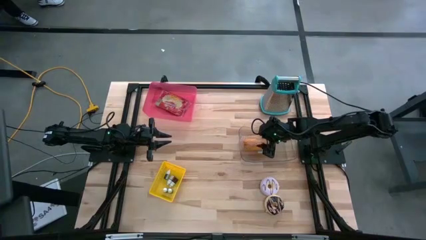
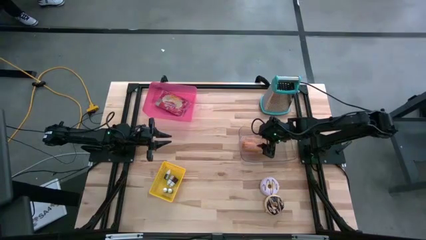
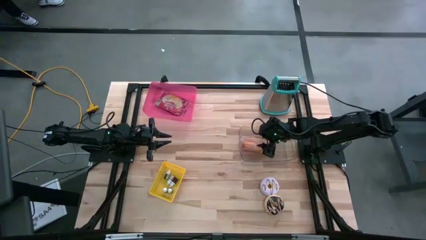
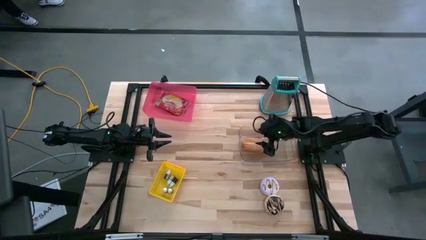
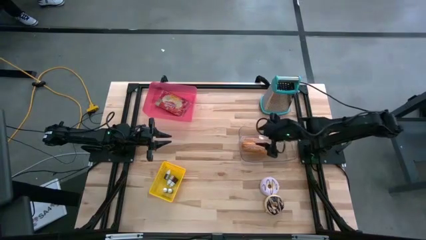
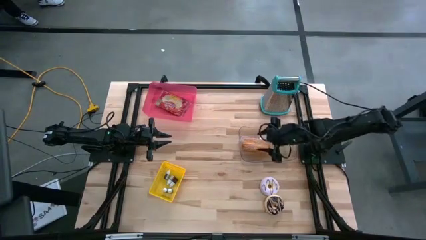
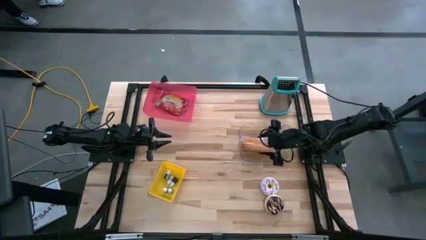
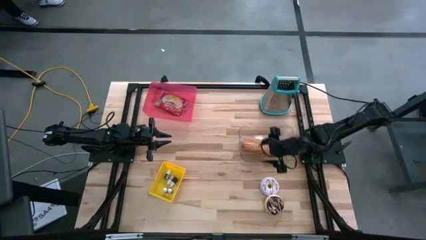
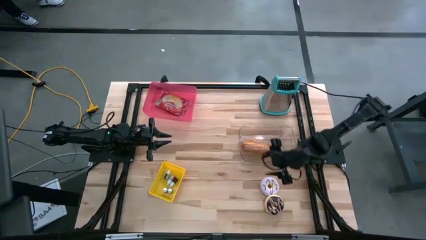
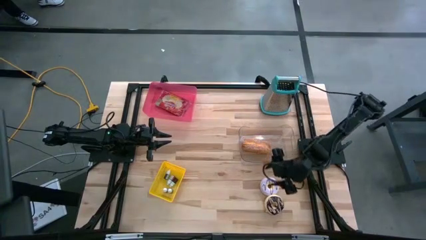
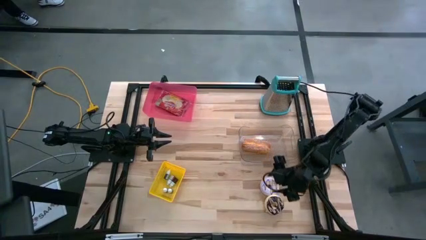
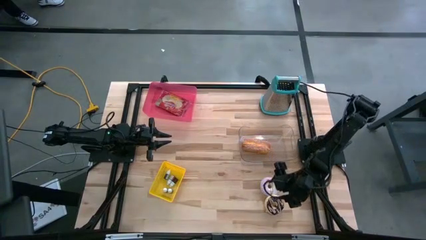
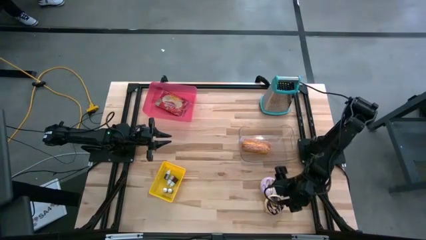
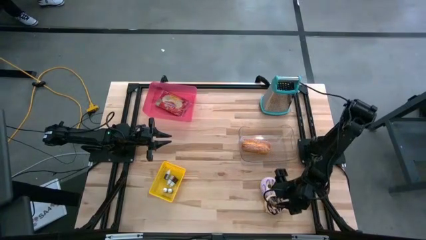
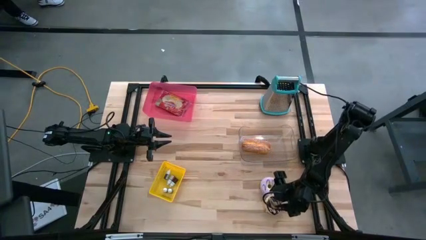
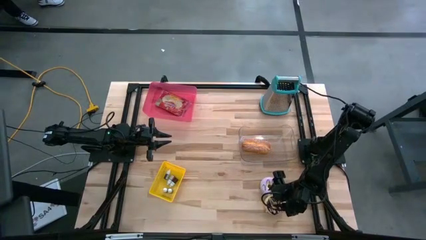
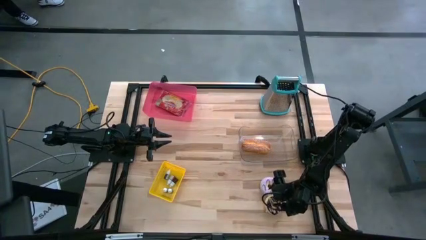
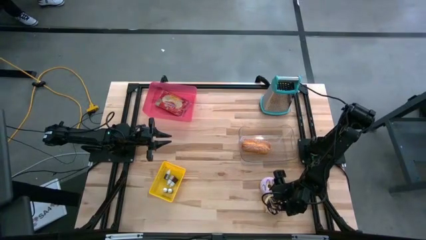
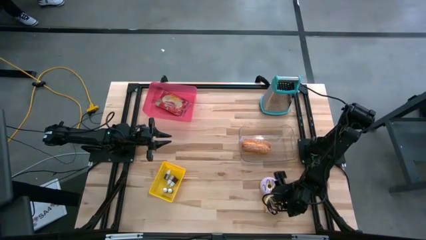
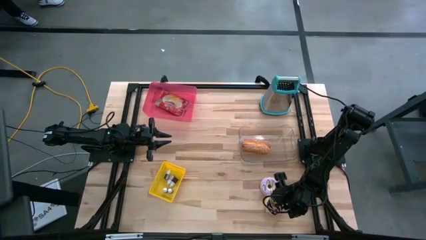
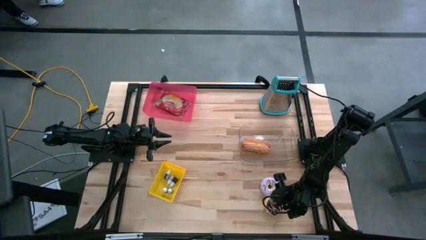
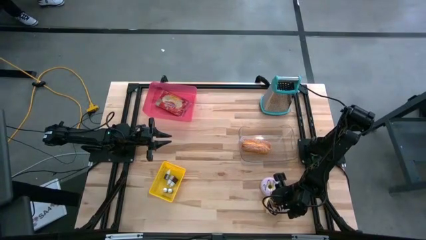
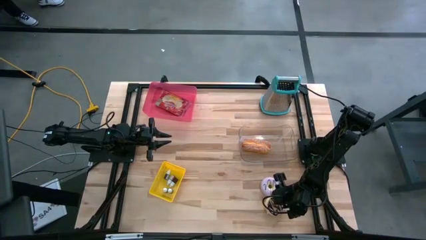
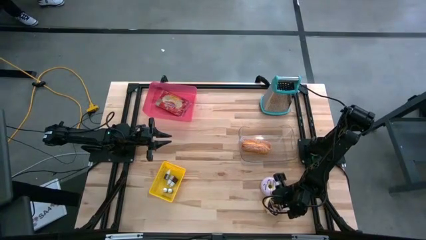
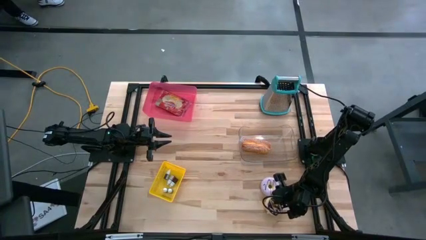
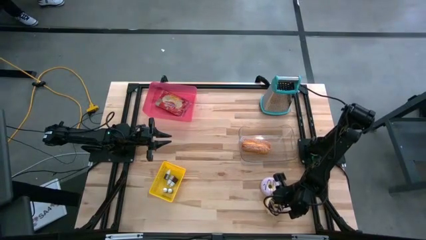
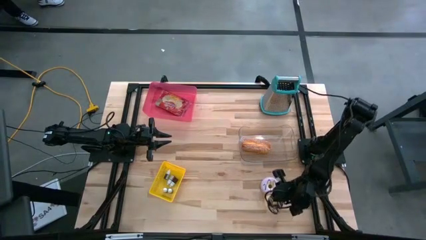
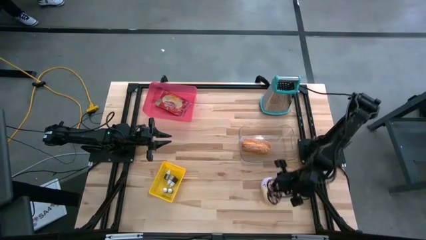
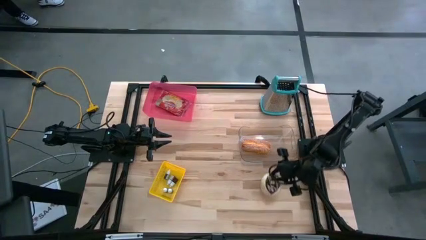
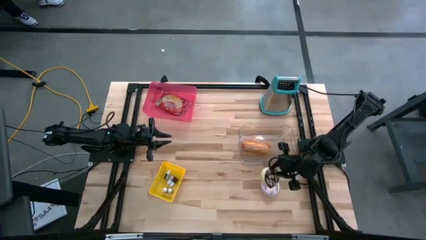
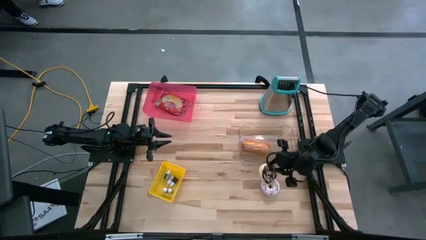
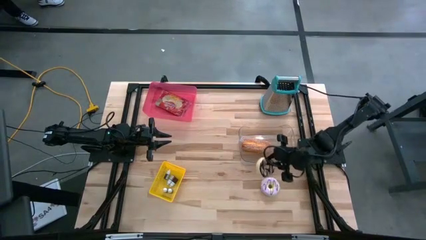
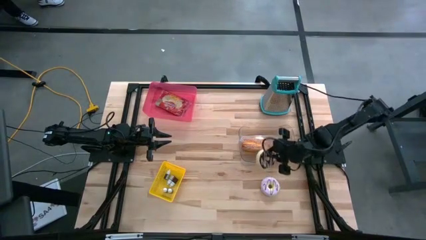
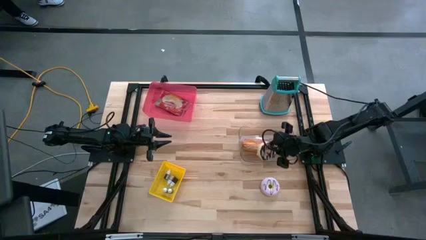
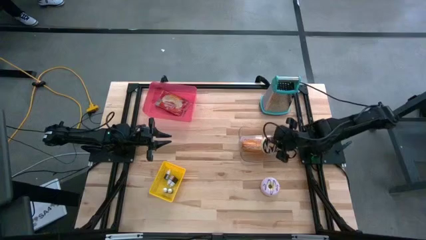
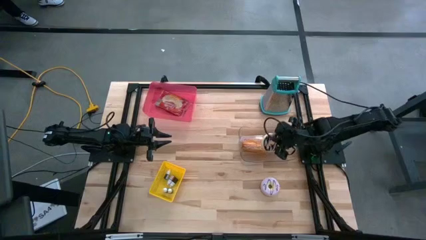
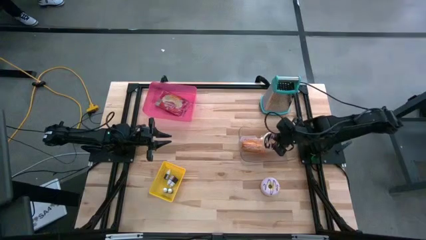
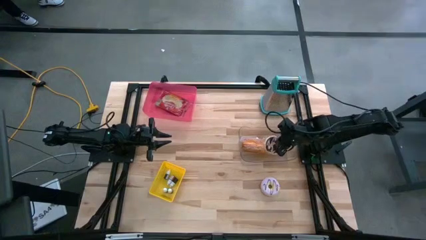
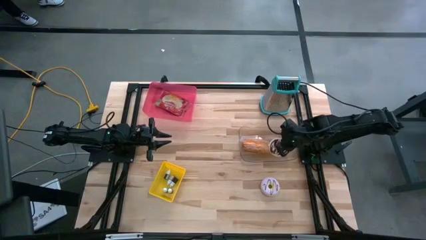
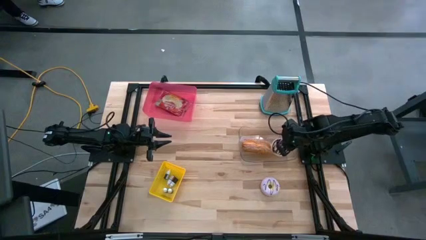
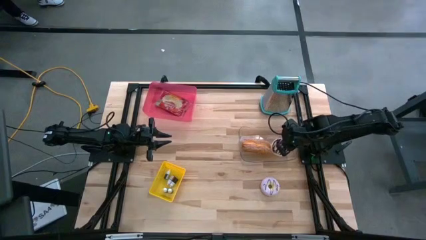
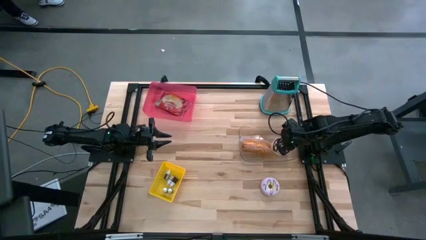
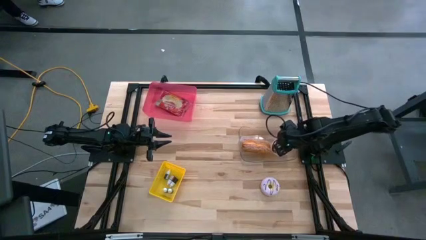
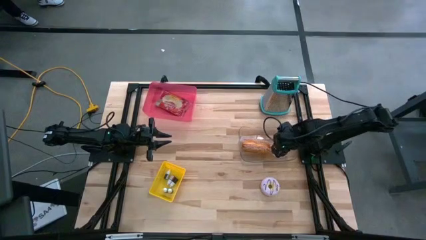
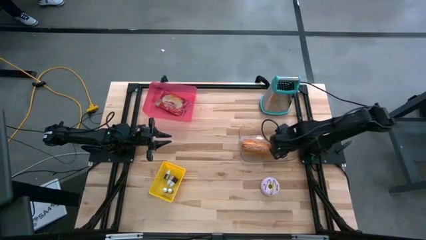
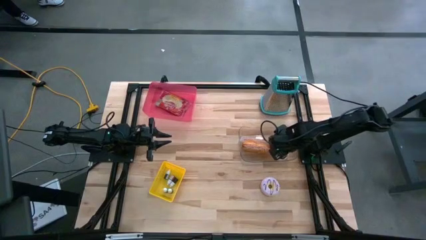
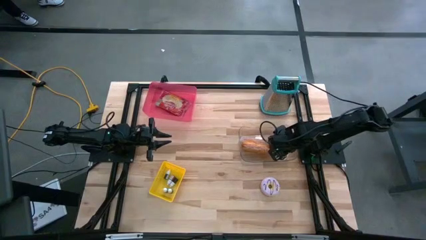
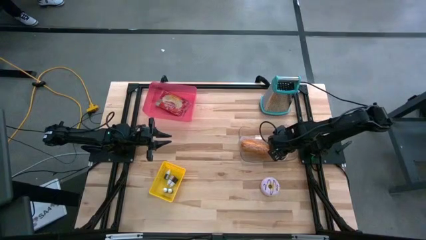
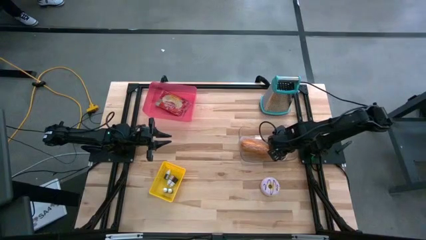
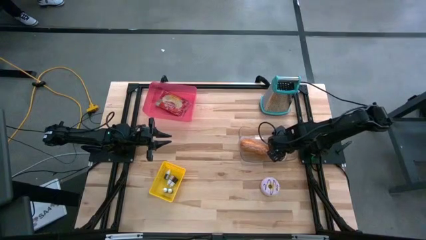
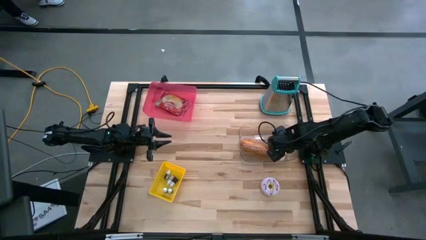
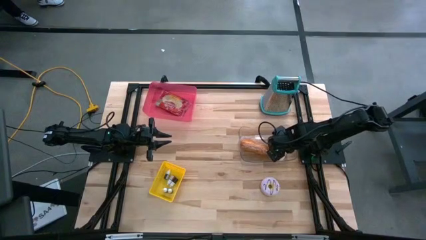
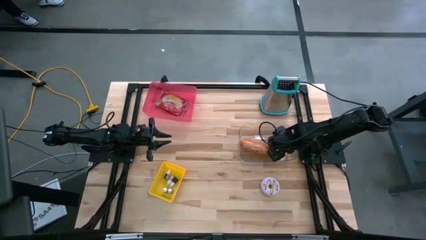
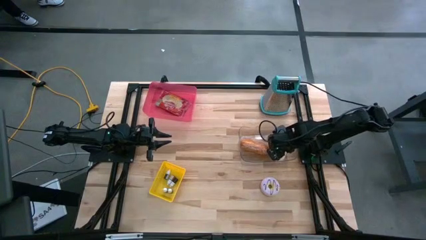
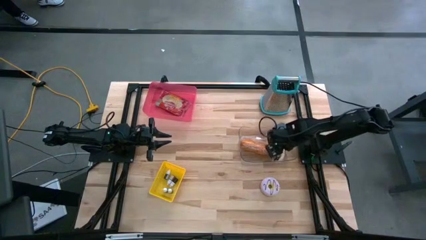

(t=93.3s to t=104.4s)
Put the black donut into the transparent bin
